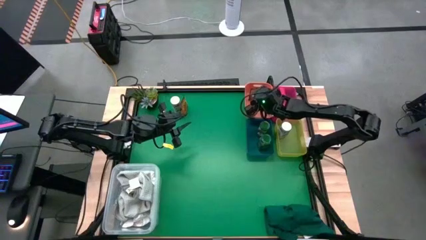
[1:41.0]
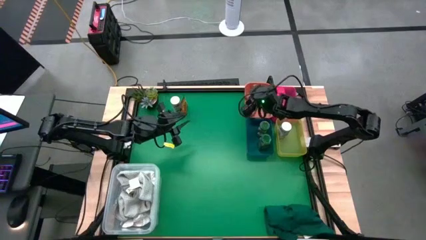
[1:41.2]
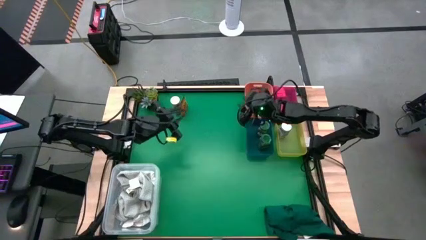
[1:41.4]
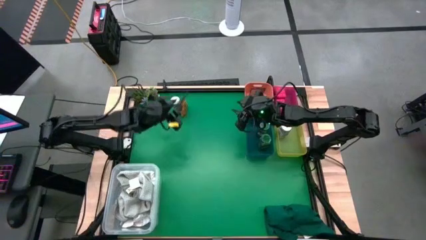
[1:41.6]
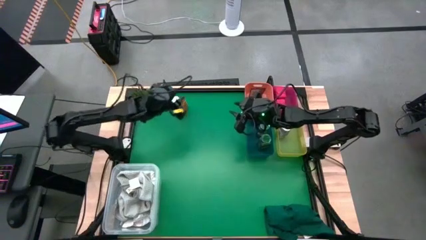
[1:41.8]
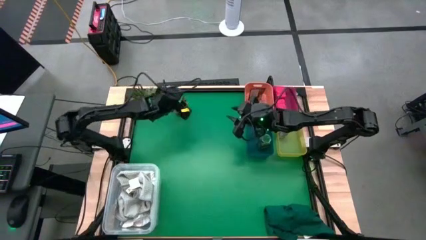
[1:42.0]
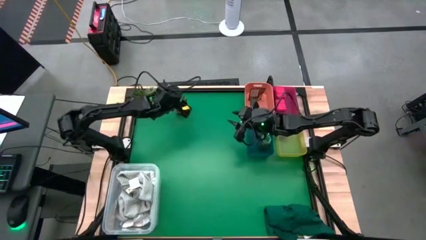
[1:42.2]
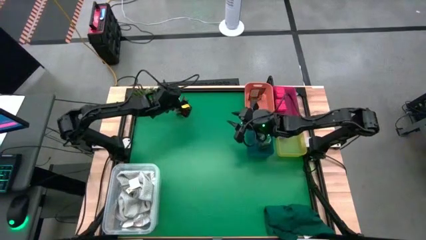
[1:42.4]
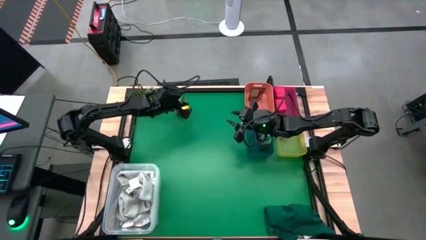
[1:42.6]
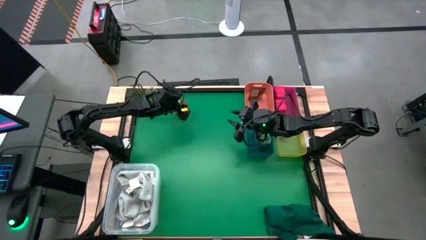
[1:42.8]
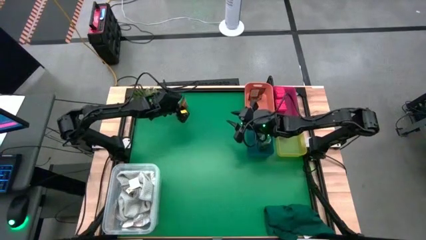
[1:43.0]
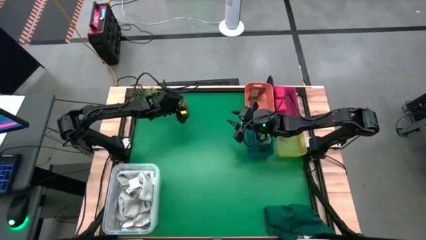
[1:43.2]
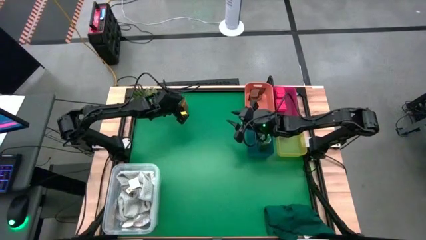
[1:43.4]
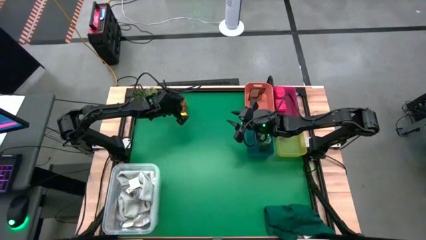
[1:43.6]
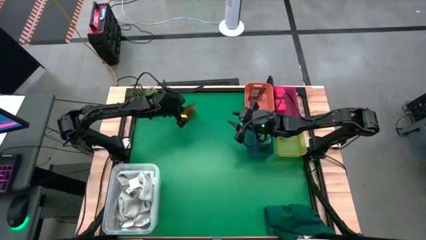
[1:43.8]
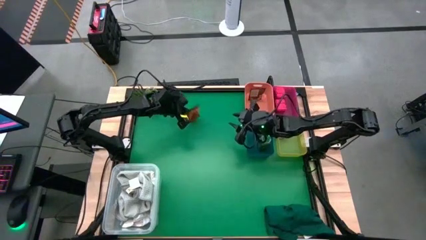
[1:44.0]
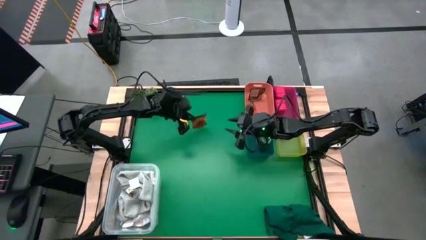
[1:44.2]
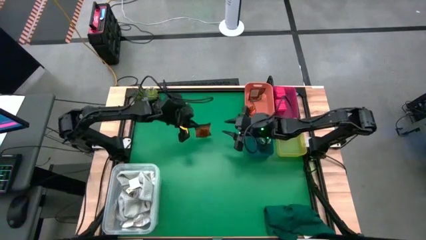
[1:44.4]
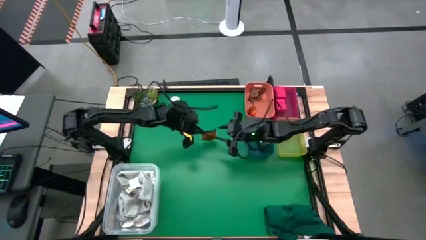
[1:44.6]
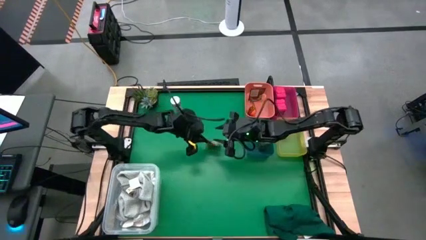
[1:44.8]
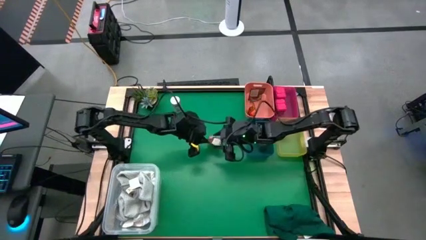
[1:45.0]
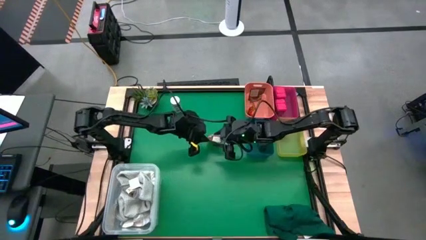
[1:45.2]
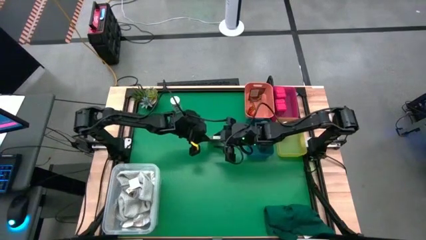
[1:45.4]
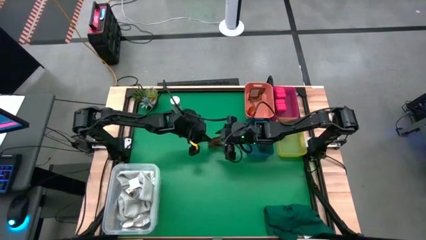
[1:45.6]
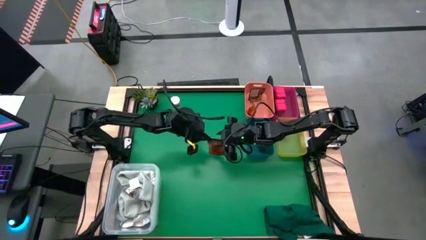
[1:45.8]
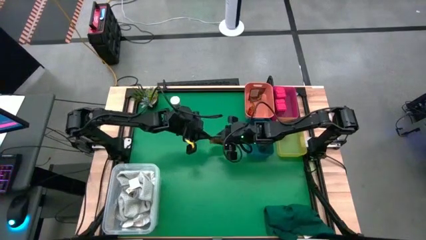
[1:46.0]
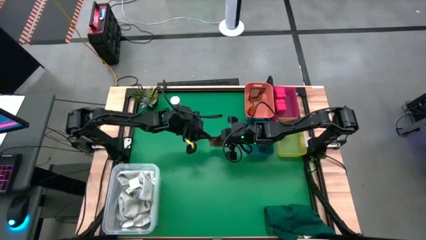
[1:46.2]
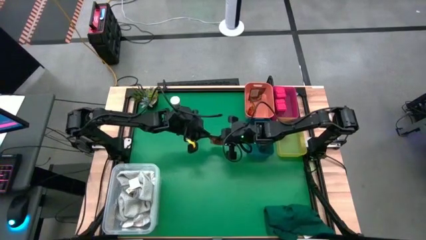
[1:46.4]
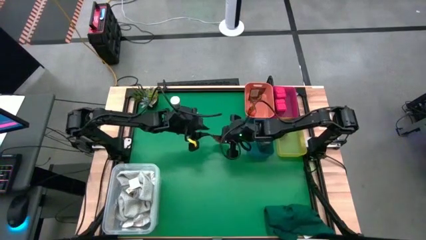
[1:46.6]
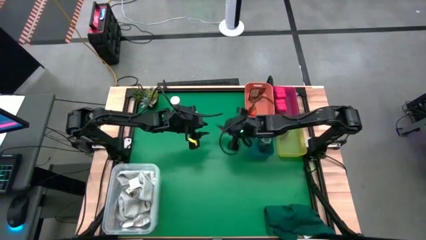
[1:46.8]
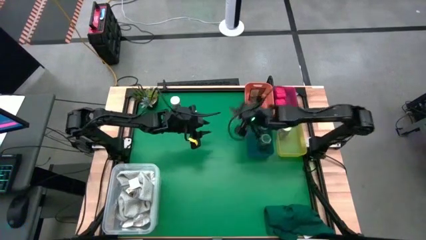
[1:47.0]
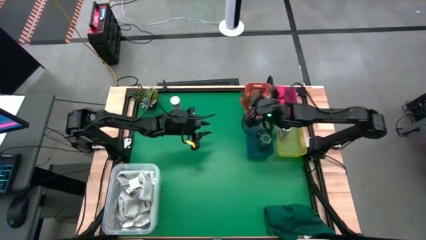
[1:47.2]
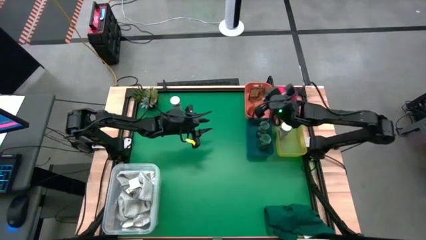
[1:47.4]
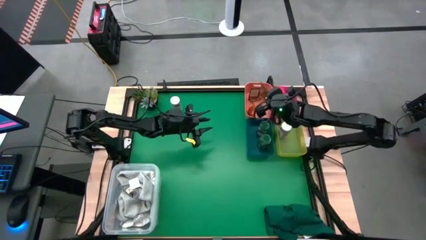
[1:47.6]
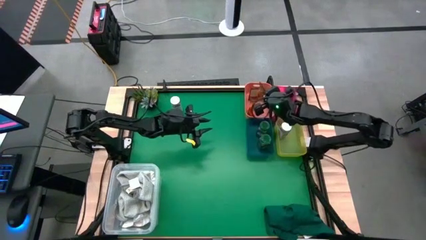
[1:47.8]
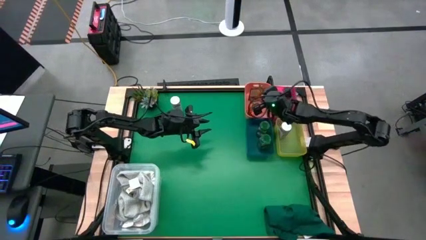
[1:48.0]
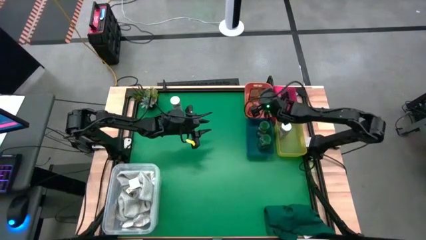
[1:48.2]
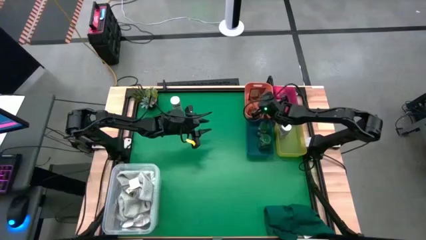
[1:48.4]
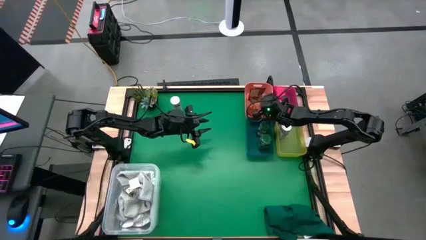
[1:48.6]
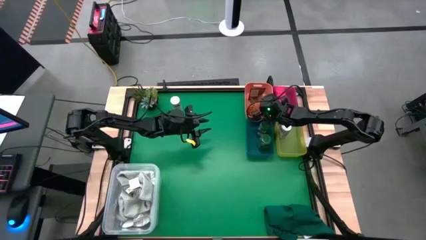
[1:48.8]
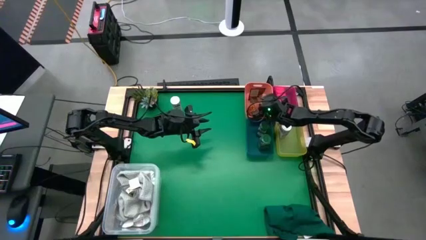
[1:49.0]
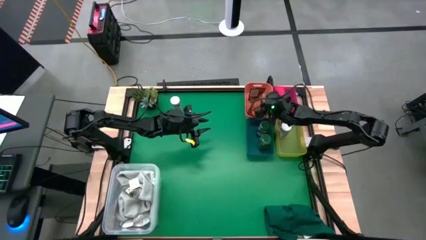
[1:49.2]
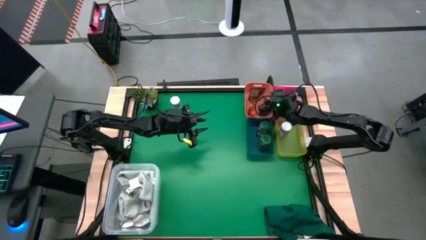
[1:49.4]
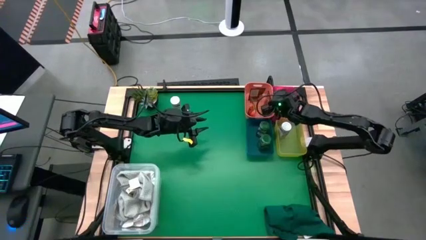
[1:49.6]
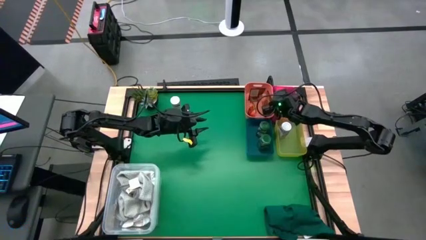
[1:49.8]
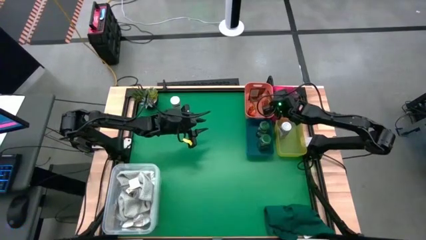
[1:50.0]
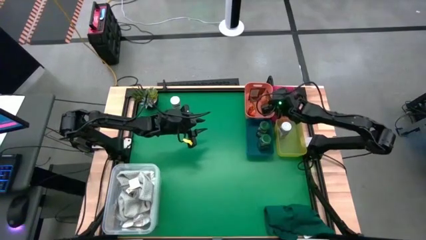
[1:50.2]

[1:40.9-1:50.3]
Task: Sort spices by type
Put the brown seasoning packet into the orange bin

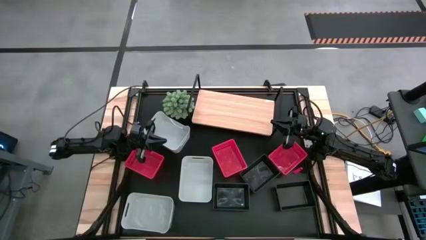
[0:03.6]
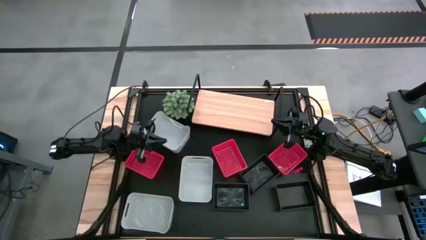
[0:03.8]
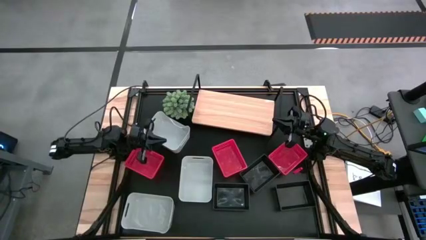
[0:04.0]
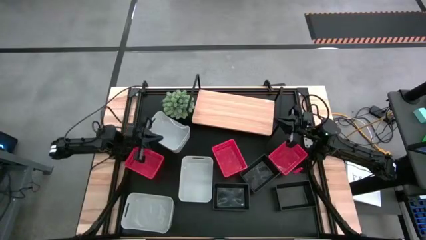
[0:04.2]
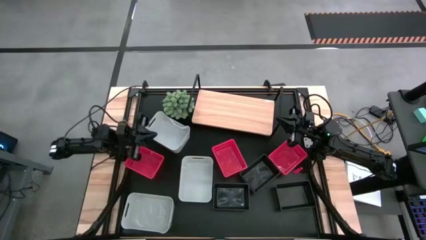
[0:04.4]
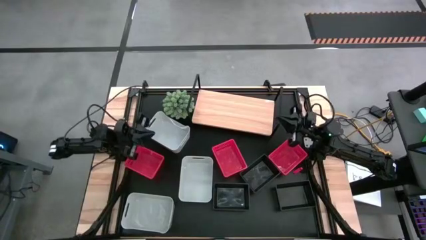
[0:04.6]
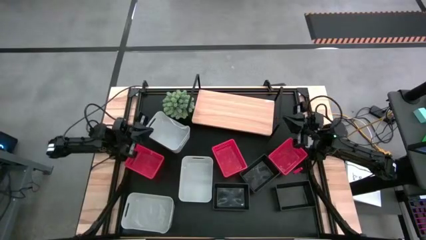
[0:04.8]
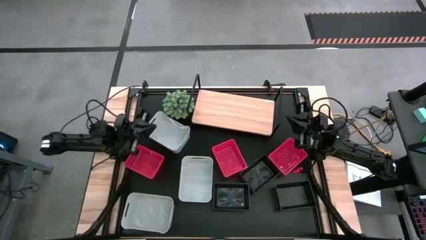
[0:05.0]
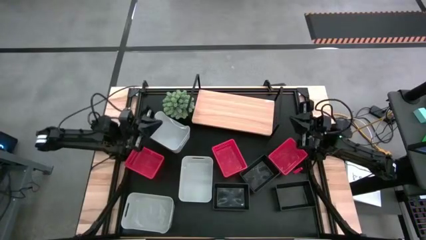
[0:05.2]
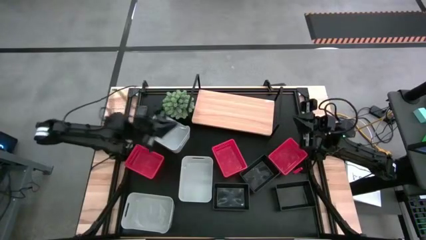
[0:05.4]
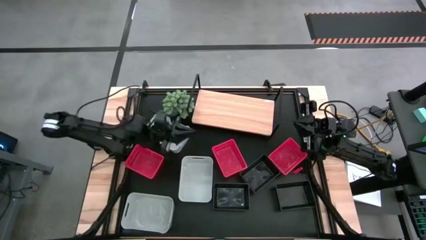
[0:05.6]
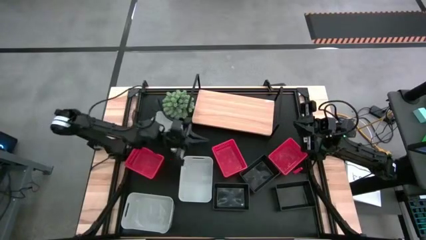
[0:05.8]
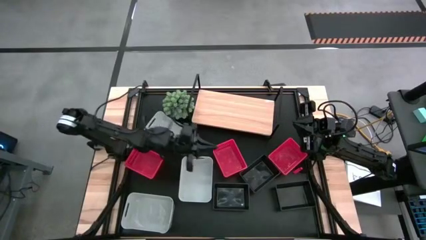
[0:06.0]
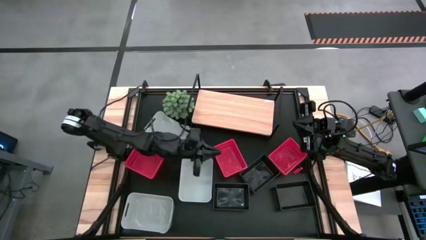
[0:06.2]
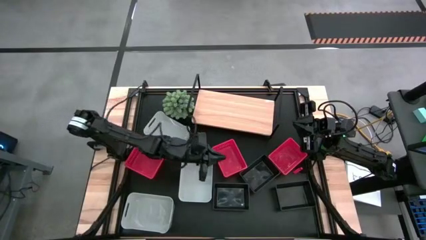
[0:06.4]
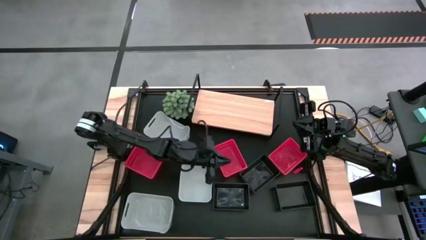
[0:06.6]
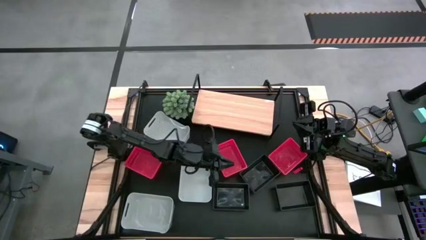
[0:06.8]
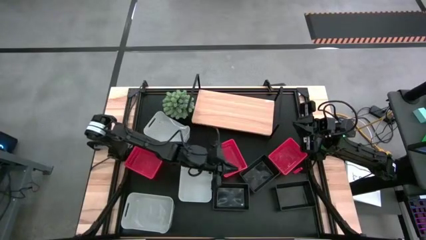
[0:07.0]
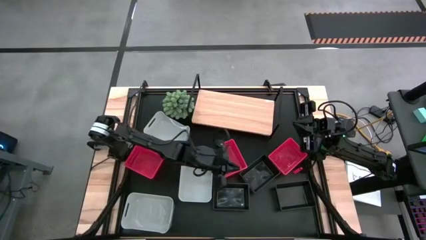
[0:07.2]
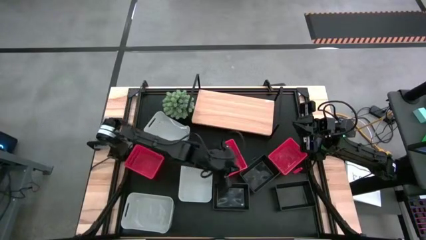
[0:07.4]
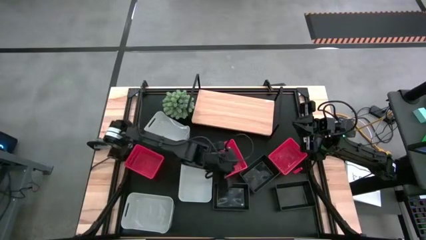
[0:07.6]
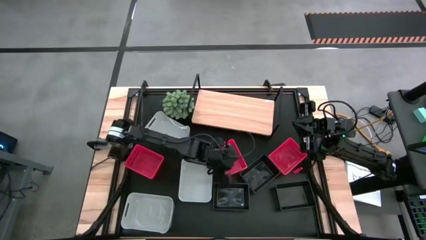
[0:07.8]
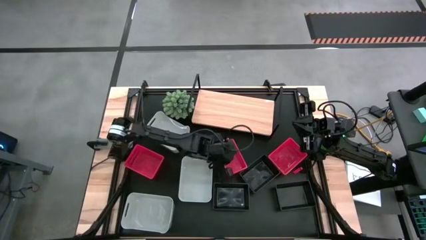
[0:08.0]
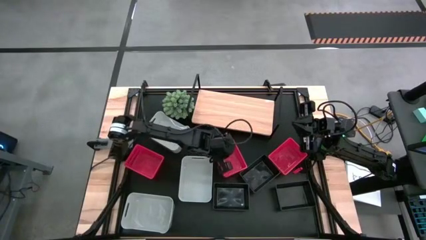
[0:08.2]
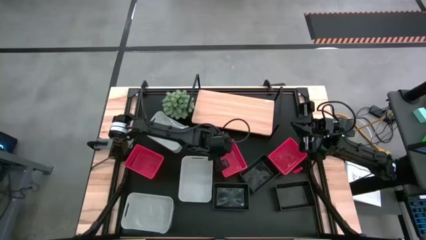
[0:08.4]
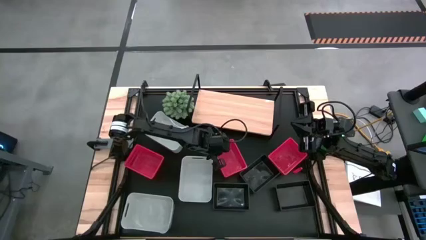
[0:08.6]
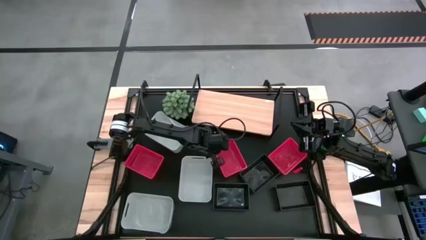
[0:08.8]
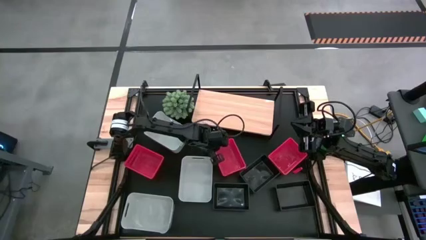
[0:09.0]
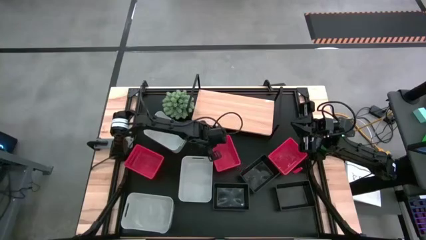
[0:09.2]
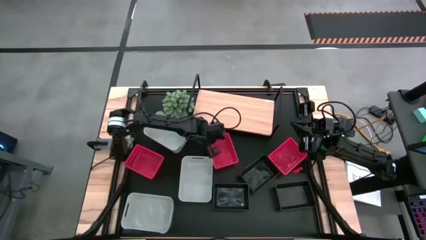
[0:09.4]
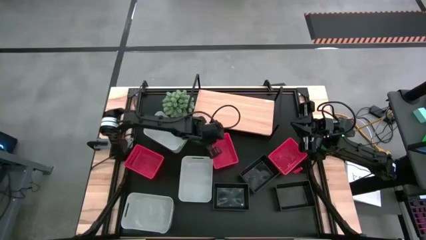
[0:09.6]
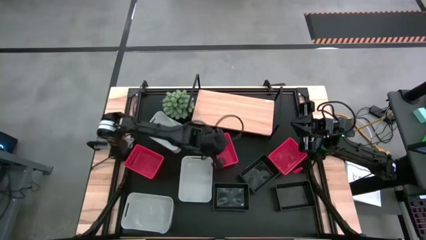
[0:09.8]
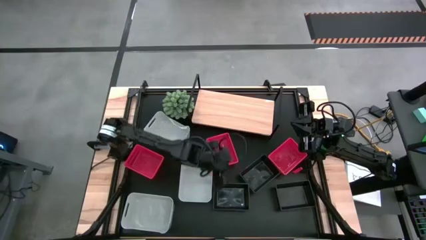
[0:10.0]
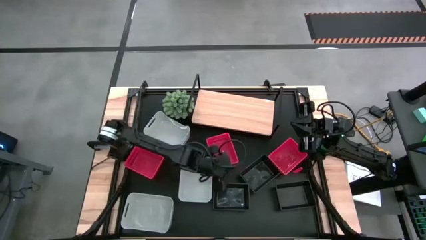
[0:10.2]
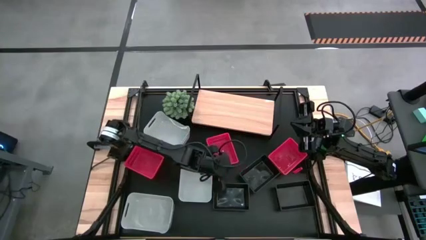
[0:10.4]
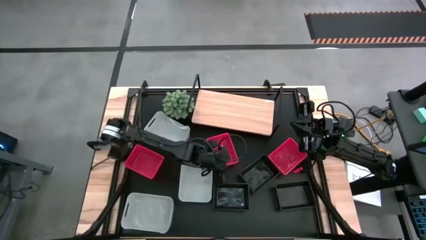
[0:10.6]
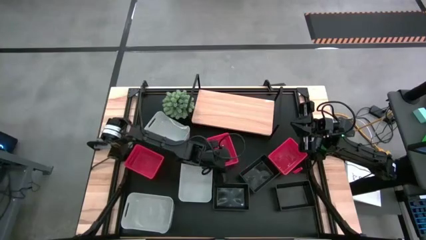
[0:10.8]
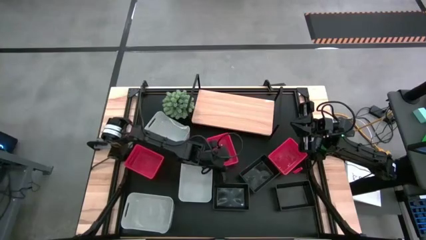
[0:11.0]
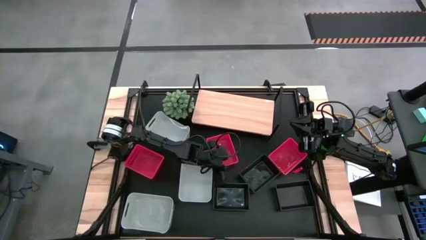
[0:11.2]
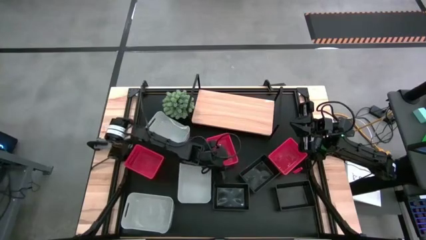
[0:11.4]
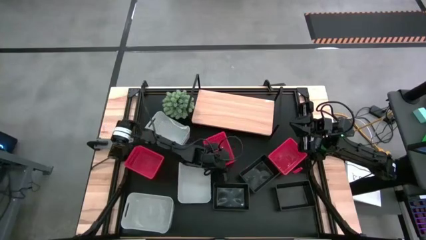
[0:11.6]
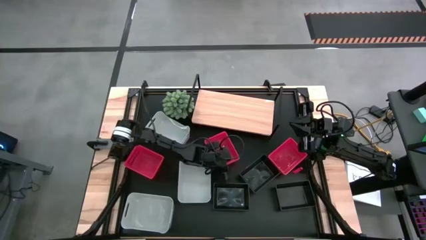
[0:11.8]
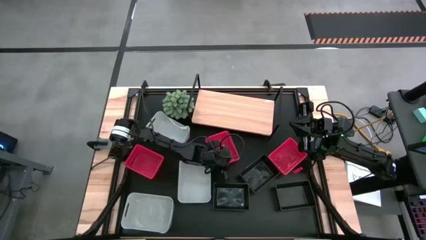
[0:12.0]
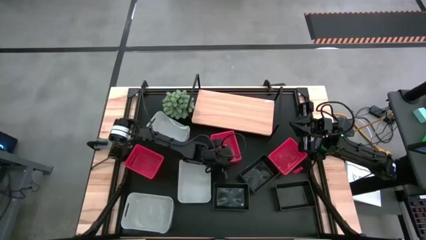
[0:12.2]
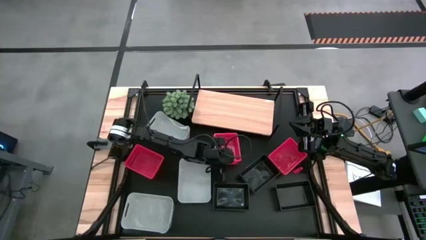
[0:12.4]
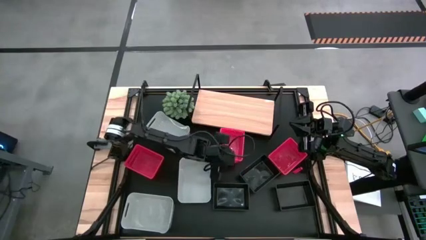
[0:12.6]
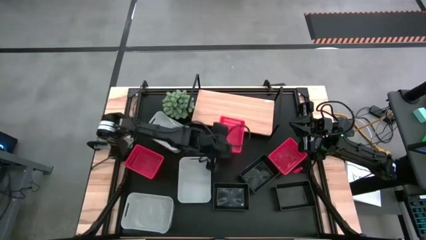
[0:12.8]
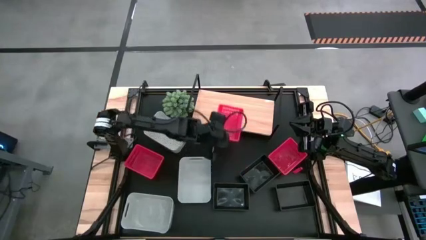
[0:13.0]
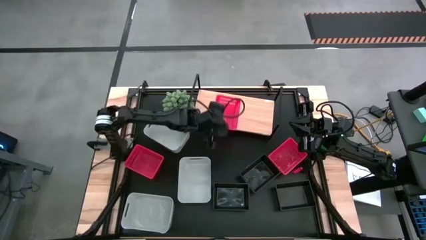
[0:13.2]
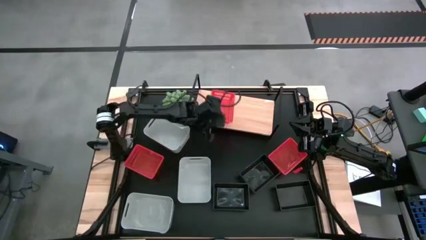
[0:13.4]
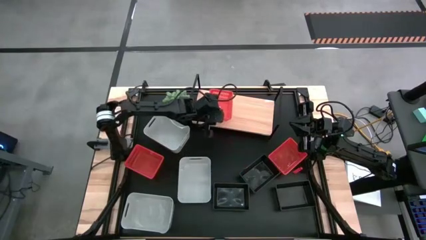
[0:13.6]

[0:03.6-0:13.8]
Task: Stack baskets on shelf by color
Put the middle red basket on the shelf
